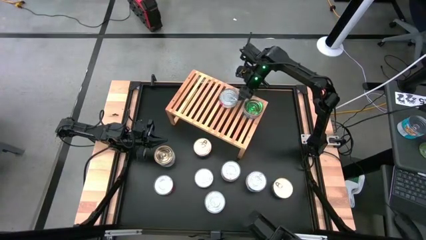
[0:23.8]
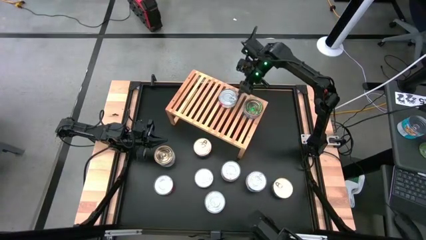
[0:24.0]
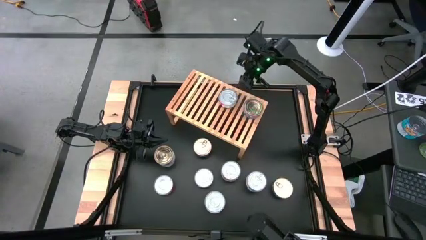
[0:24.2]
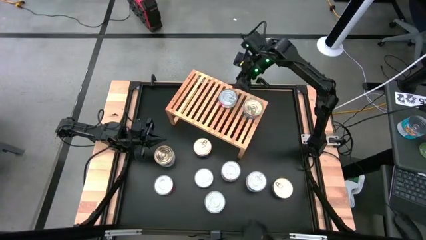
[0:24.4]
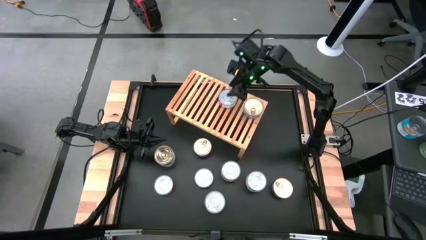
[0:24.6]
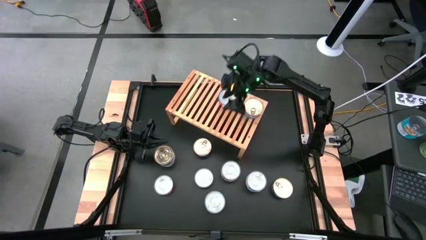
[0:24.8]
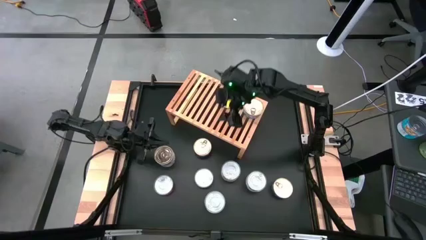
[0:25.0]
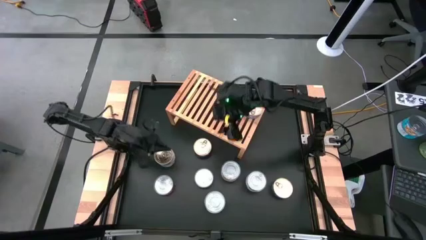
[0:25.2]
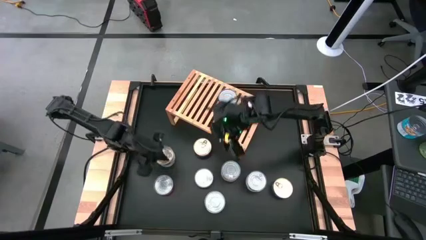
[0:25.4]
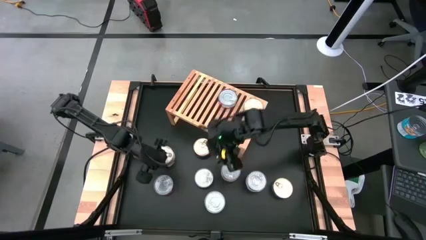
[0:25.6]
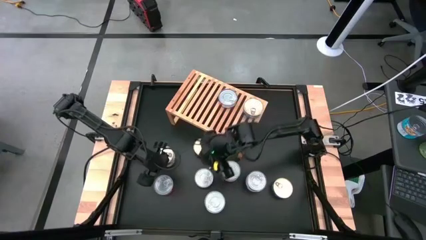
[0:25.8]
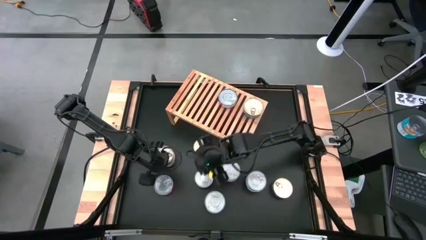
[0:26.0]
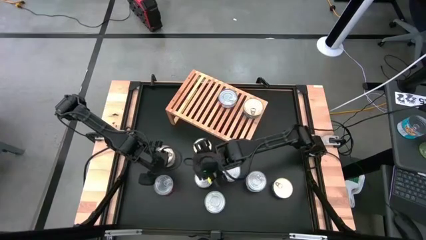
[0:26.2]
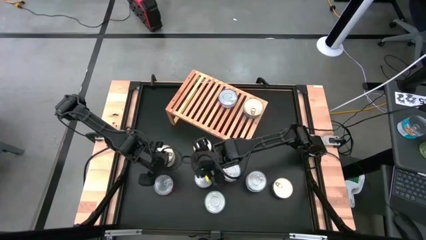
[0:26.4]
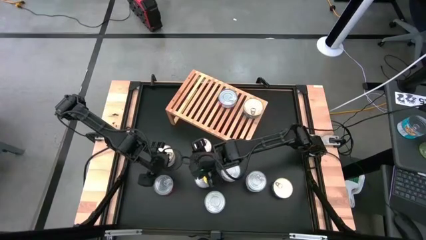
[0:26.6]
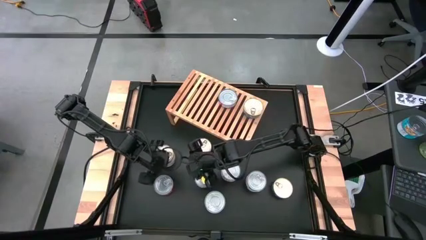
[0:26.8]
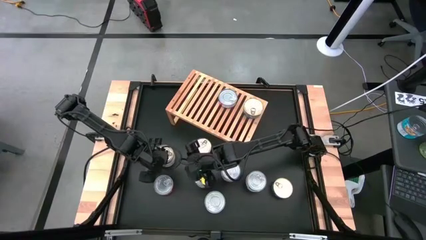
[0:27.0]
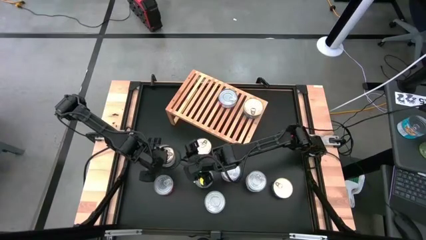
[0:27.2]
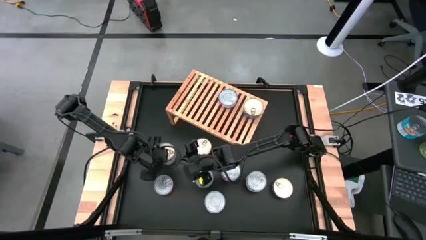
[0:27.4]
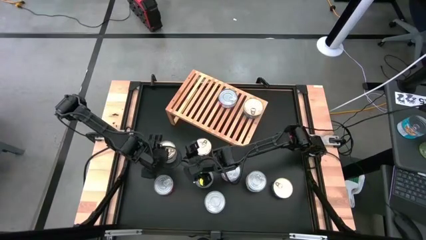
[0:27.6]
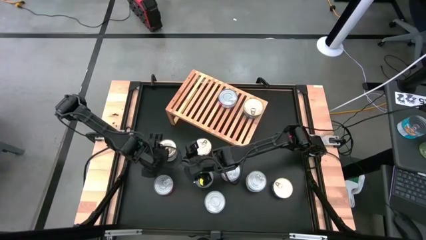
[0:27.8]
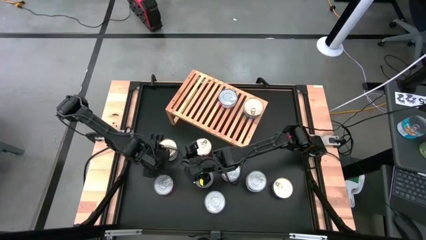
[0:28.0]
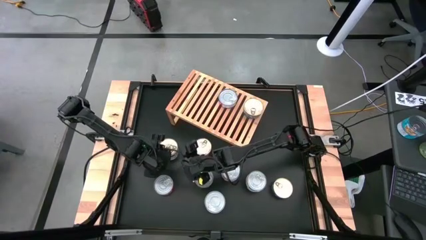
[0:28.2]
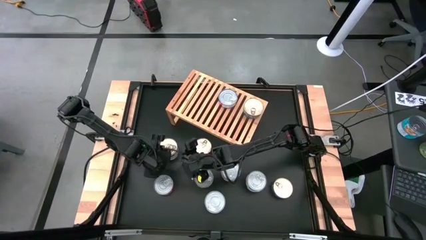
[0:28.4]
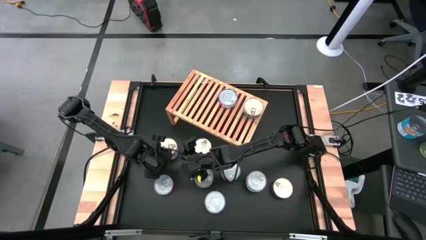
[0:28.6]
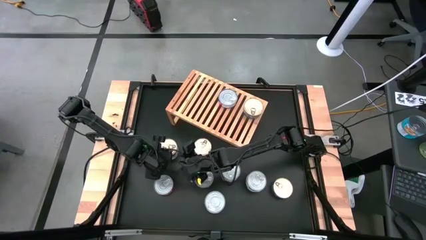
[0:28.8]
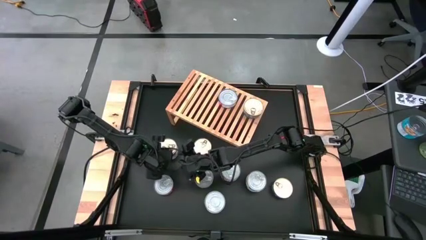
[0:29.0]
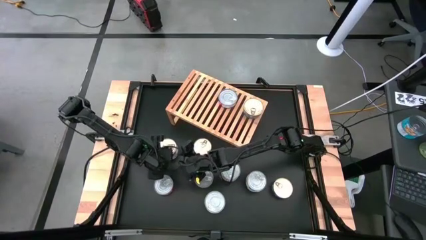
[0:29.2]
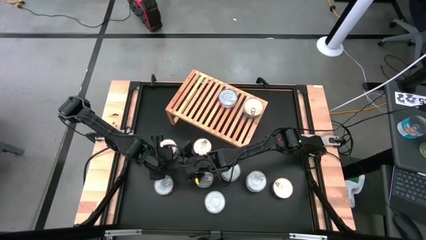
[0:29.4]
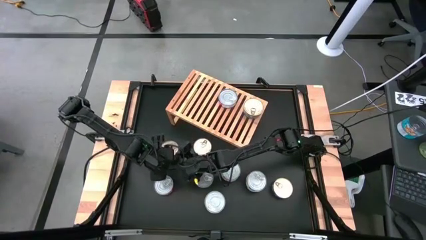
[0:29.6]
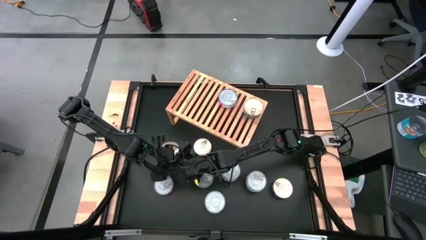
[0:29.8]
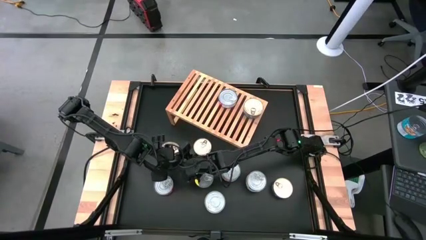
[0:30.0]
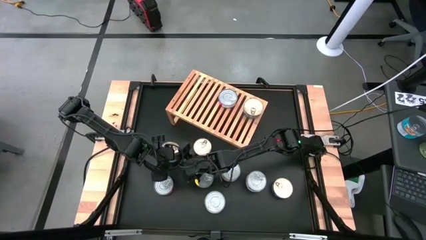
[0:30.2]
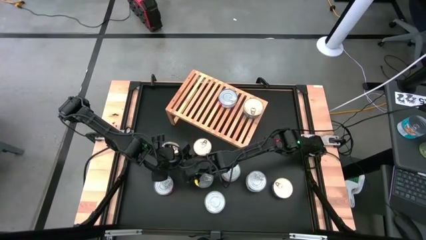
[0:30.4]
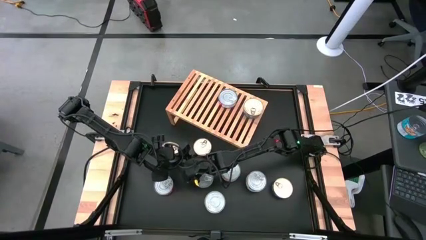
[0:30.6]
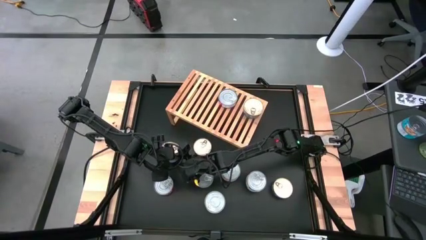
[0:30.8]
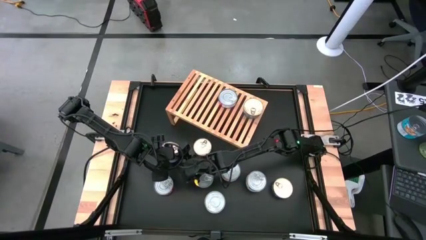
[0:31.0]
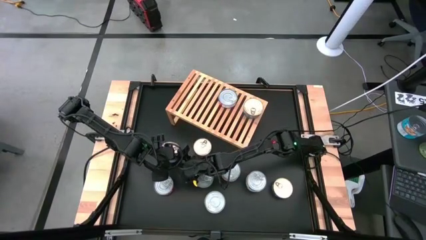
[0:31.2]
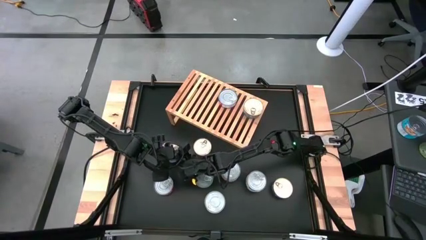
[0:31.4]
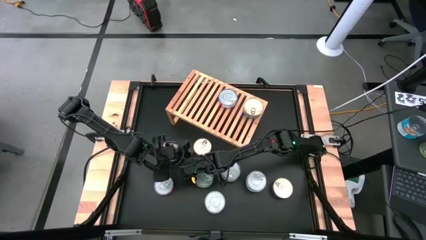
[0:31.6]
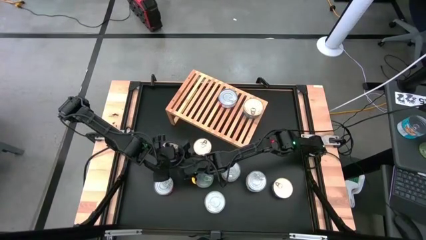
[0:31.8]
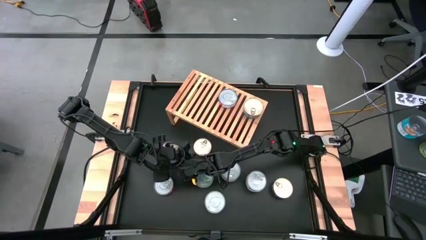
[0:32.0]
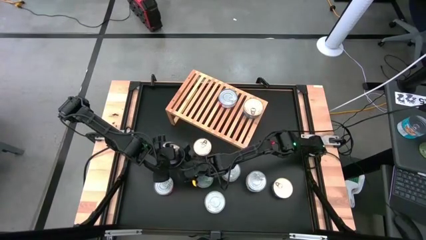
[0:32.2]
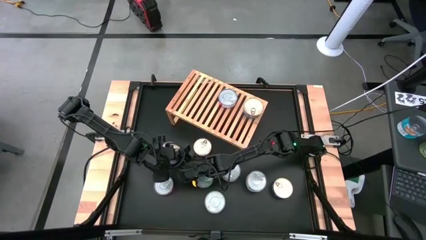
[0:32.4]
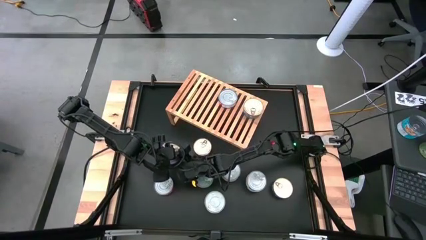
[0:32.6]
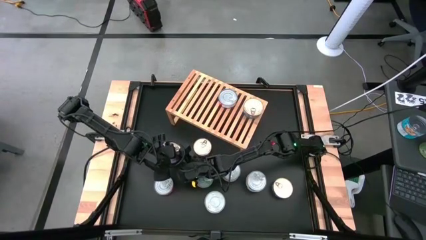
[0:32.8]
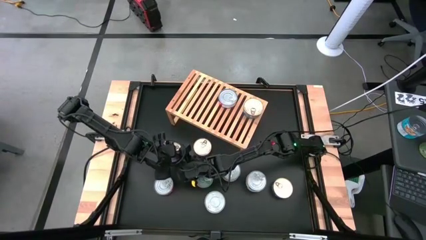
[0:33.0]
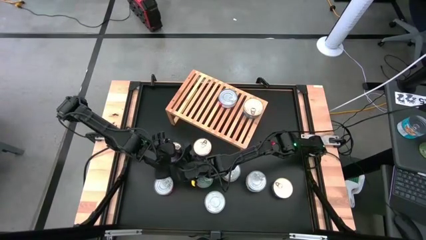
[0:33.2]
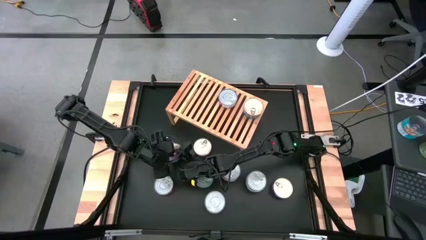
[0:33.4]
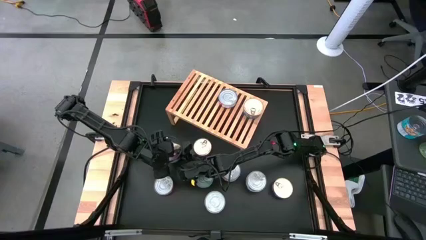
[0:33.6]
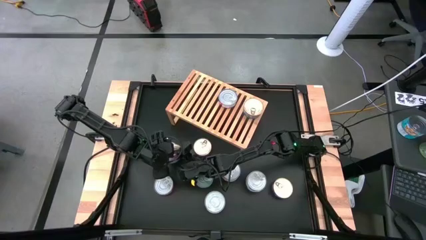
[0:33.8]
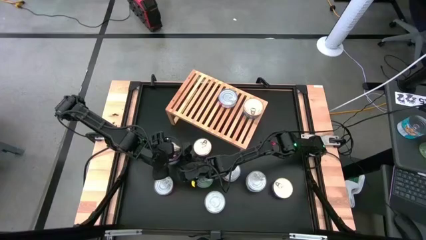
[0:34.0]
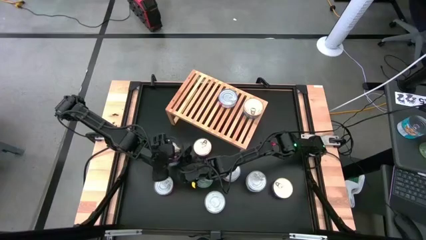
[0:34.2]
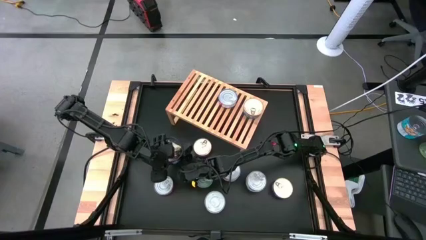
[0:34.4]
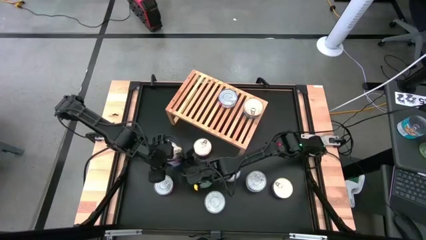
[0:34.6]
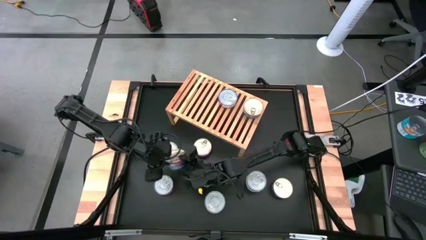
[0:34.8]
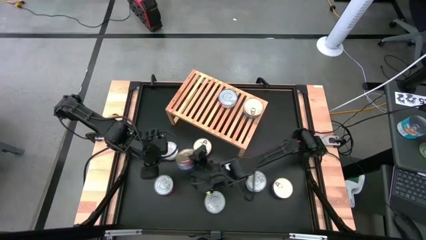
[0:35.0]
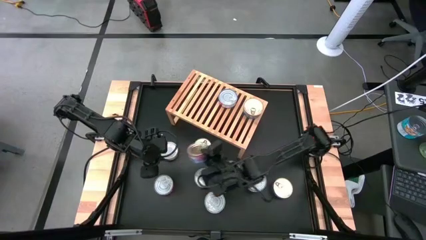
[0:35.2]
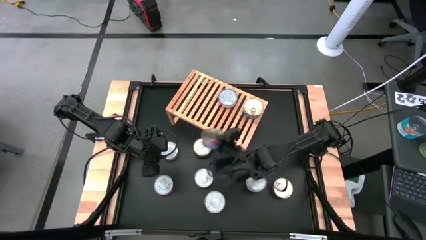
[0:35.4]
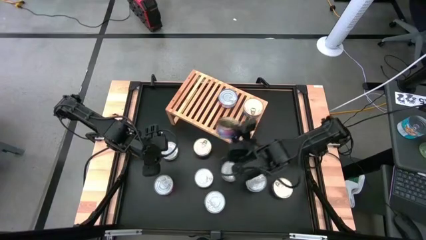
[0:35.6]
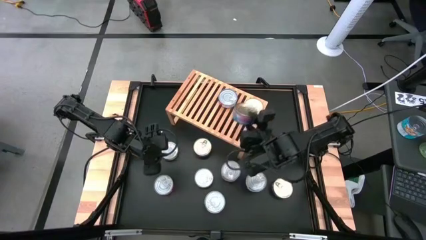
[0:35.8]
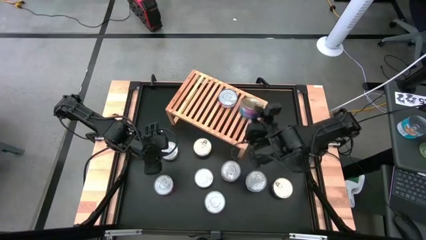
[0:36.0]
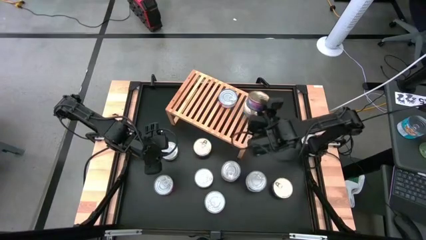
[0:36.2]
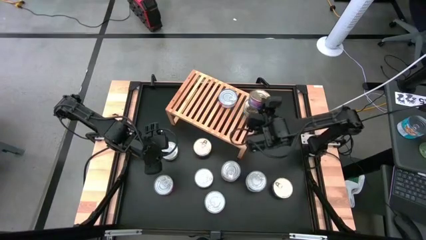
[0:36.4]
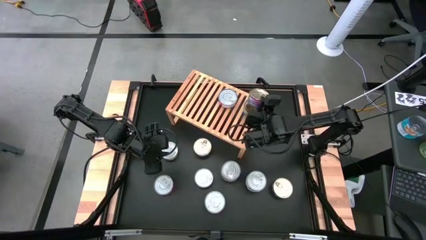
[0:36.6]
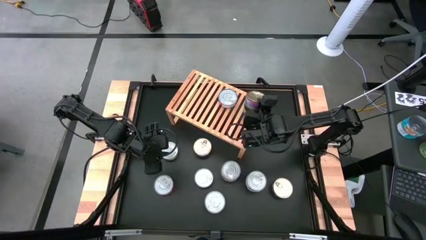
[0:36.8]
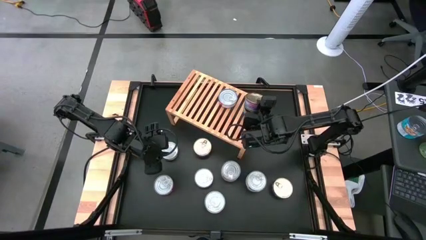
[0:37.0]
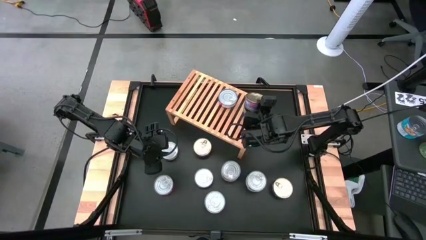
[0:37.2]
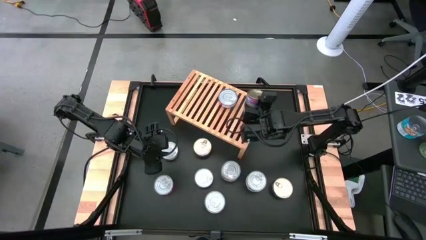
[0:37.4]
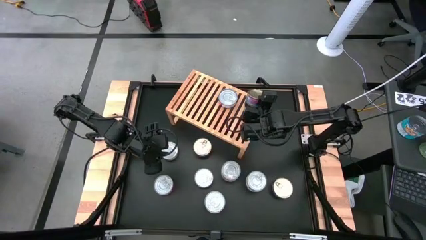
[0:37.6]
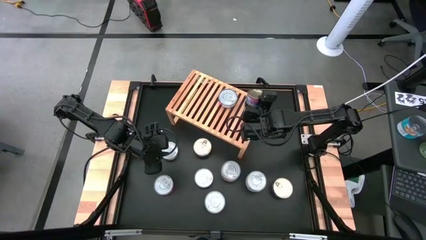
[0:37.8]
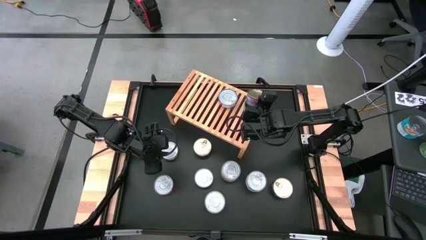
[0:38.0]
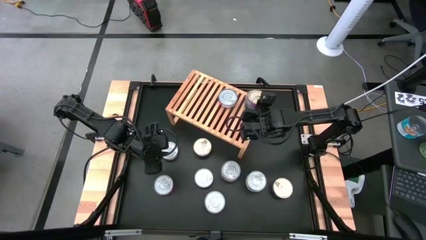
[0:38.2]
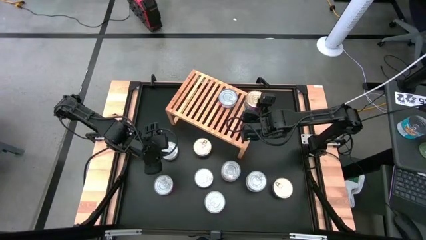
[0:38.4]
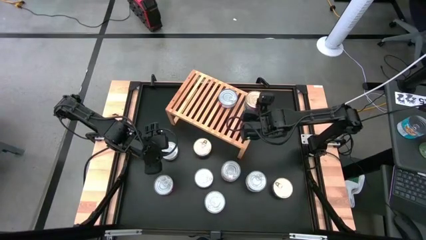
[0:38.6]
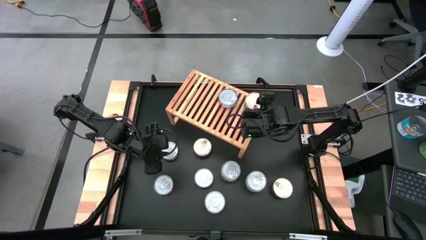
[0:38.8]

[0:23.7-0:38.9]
Task: Stack canned seafood by type on shelf
Stack the blue and pink tuna can on top of the blue and pink tuna can on the shelf

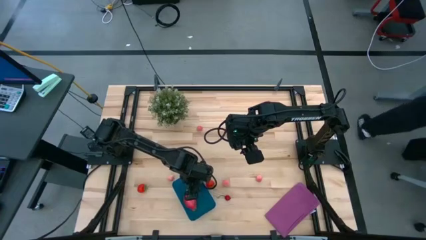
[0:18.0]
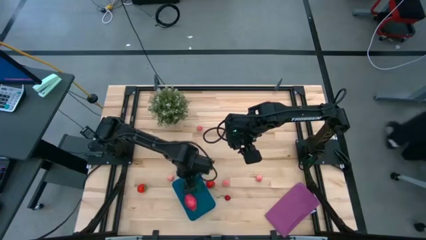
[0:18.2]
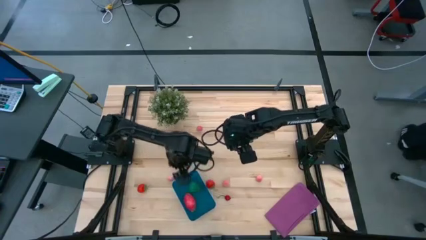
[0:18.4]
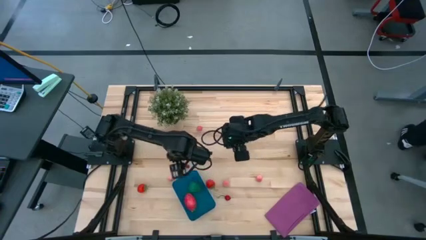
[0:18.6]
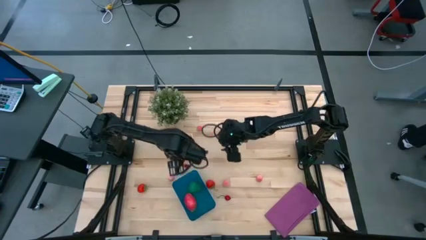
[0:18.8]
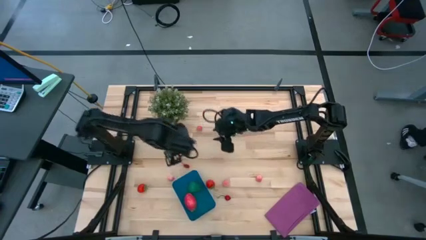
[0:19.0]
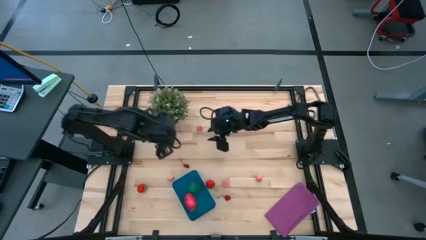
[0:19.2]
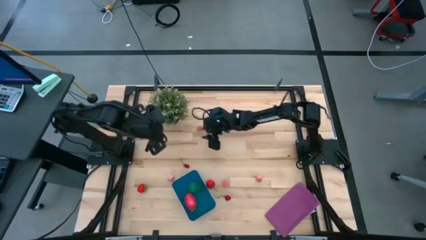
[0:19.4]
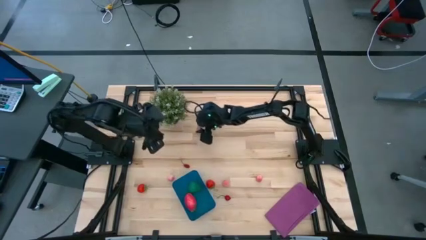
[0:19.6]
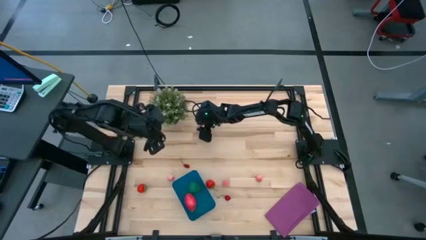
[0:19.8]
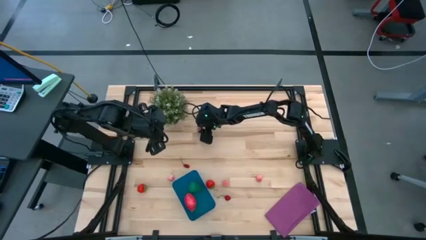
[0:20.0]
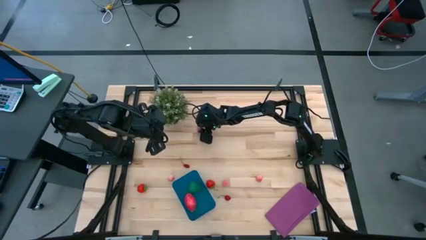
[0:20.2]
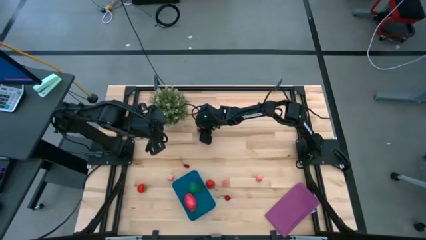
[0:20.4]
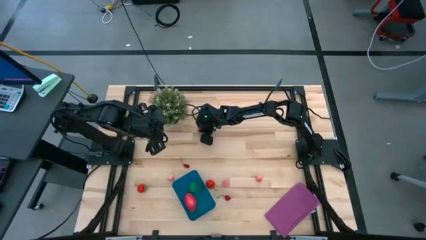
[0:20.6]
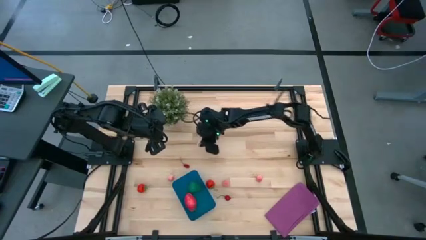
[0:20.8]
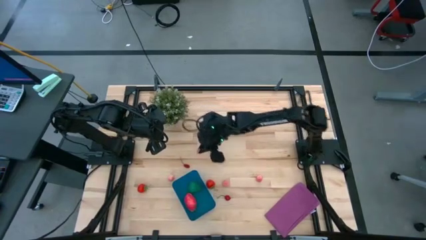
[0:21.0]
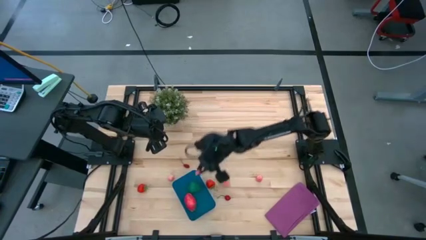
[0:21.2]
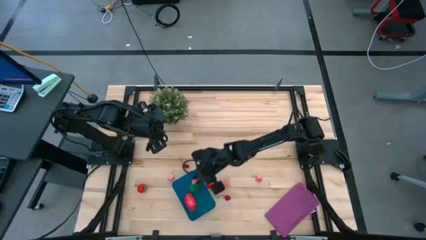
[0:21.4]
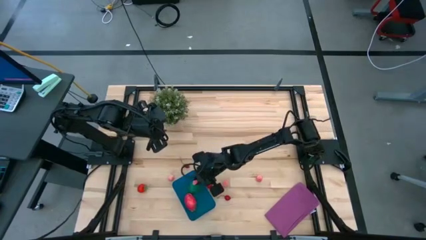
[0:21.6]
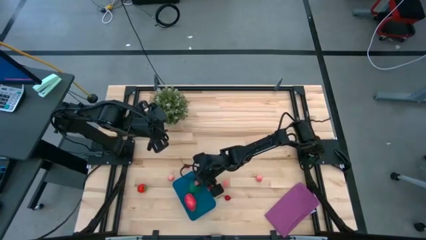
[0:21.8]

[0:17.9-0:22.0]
Task: Pick and placing Produce into tupperware
Put the pink peach into the blue bin
